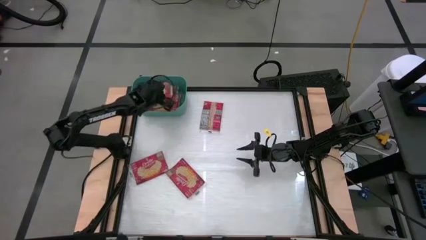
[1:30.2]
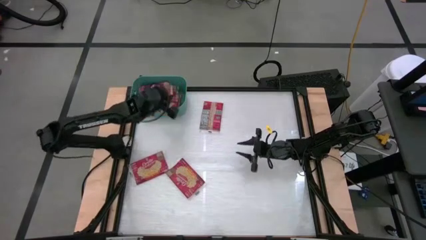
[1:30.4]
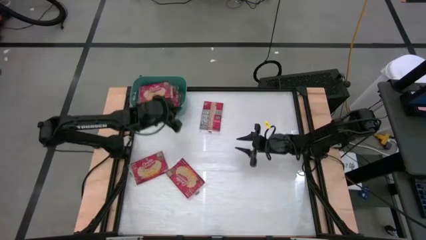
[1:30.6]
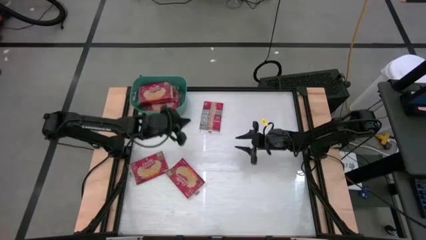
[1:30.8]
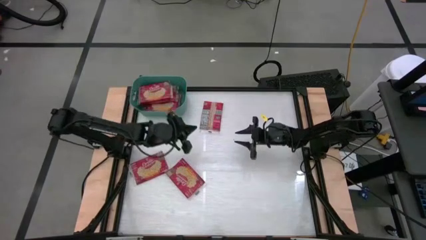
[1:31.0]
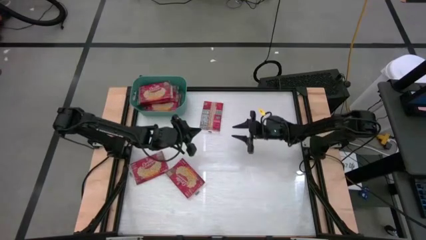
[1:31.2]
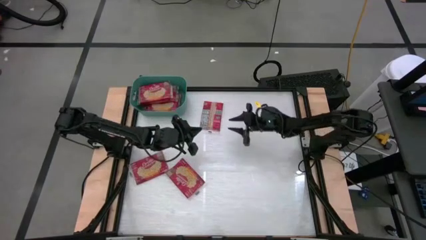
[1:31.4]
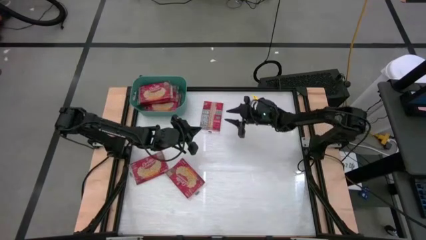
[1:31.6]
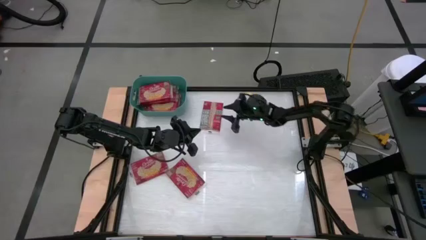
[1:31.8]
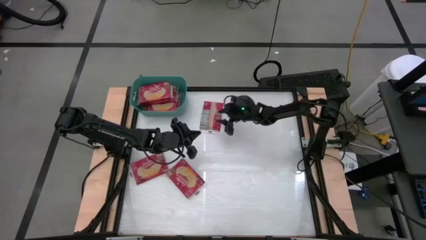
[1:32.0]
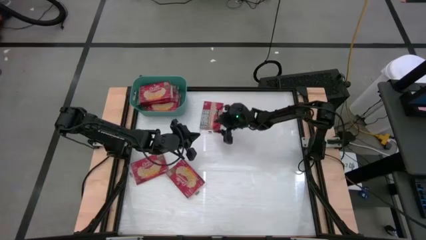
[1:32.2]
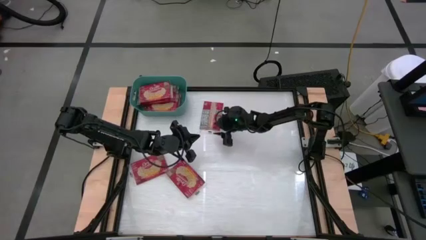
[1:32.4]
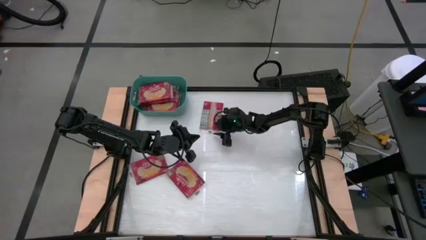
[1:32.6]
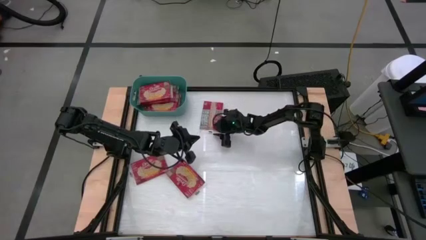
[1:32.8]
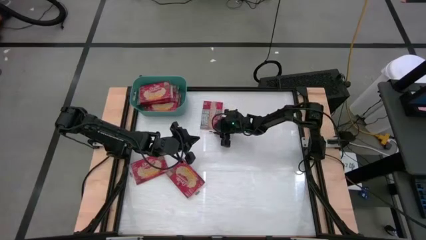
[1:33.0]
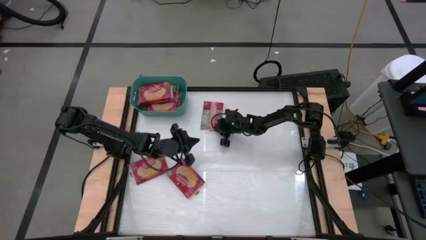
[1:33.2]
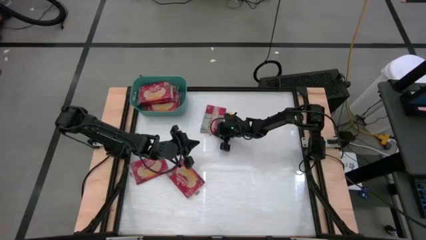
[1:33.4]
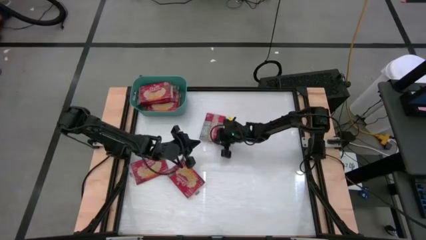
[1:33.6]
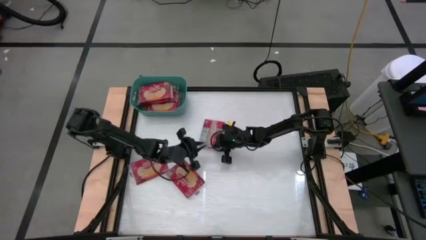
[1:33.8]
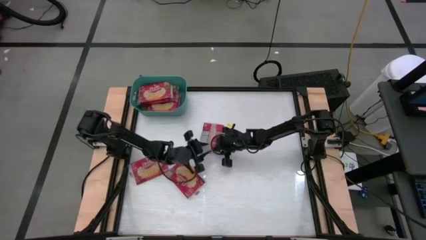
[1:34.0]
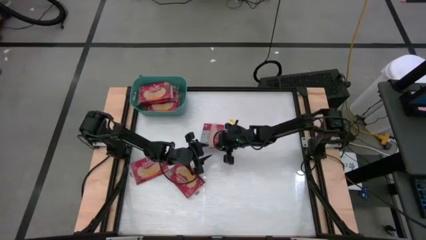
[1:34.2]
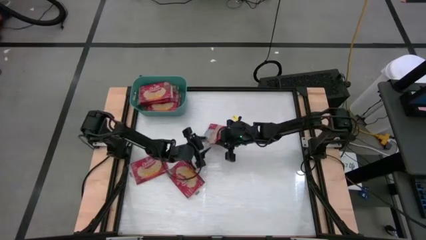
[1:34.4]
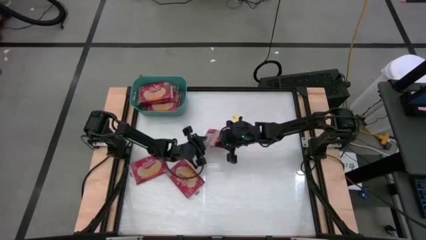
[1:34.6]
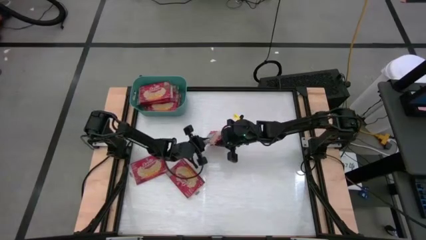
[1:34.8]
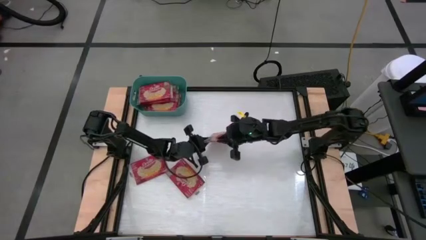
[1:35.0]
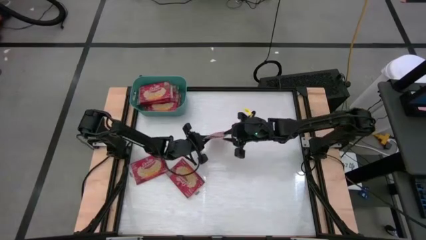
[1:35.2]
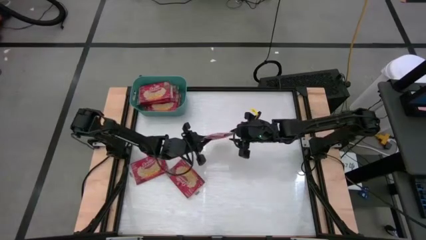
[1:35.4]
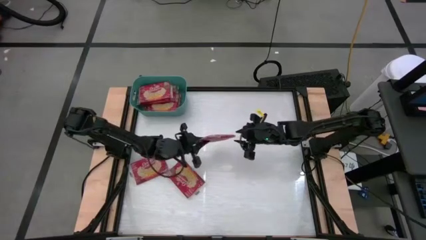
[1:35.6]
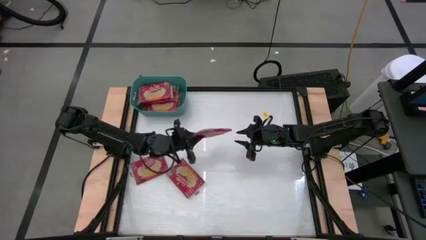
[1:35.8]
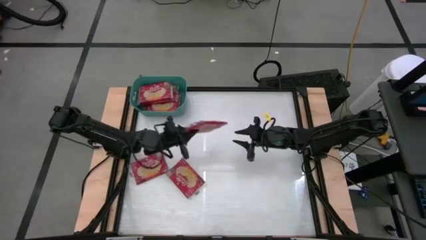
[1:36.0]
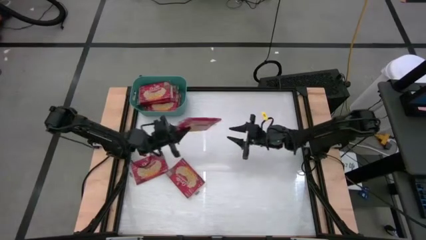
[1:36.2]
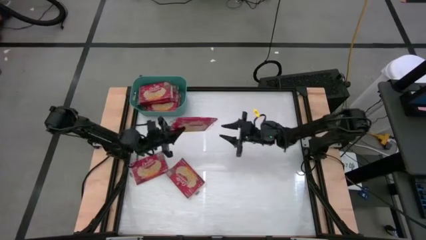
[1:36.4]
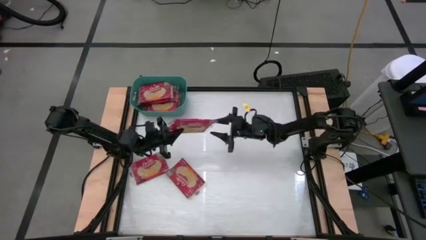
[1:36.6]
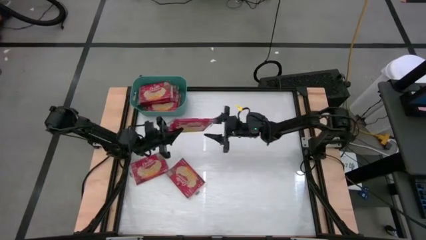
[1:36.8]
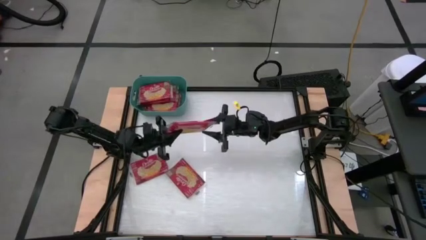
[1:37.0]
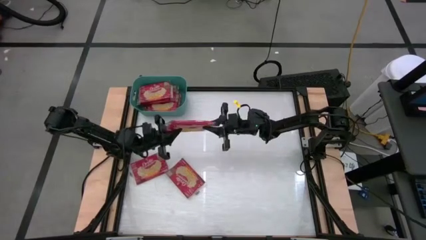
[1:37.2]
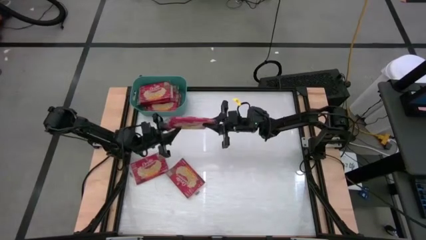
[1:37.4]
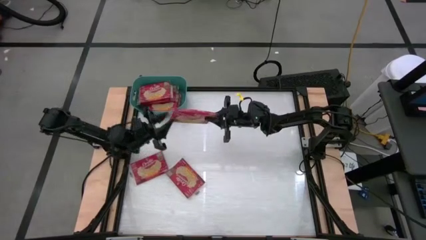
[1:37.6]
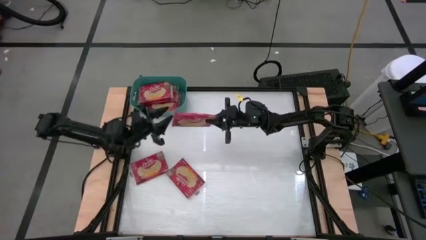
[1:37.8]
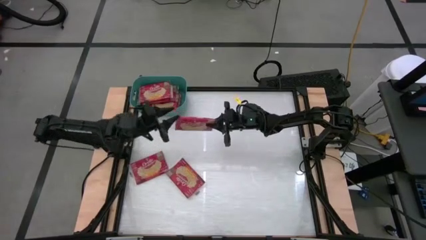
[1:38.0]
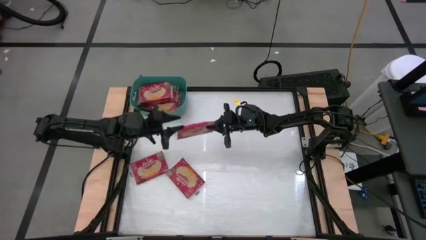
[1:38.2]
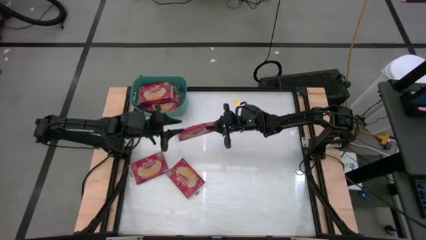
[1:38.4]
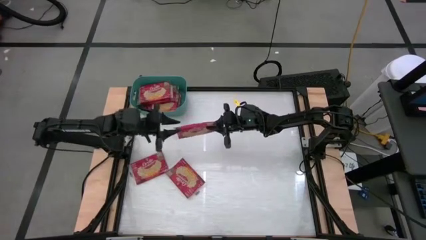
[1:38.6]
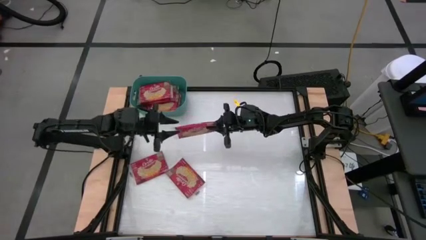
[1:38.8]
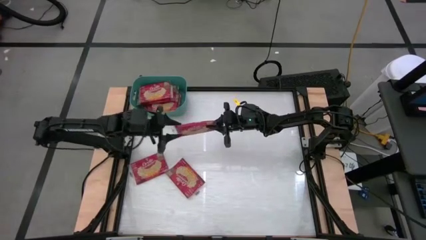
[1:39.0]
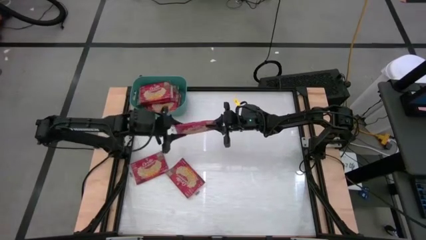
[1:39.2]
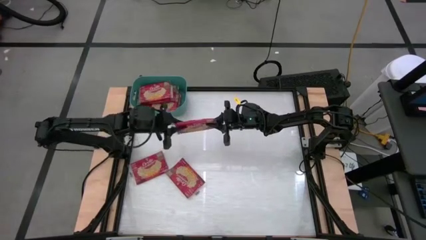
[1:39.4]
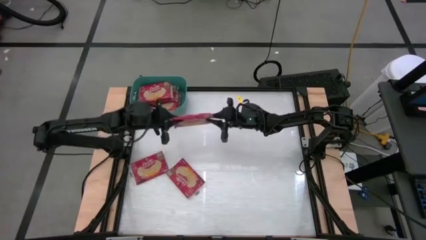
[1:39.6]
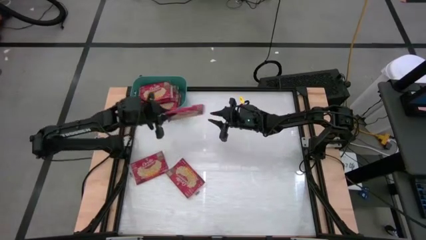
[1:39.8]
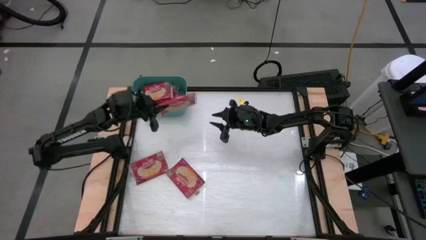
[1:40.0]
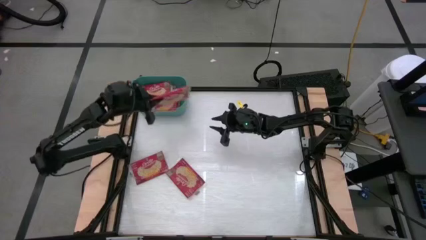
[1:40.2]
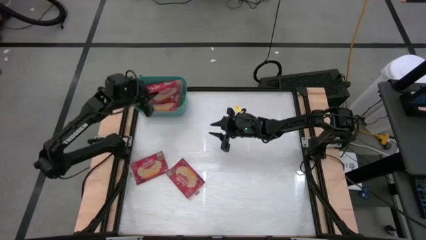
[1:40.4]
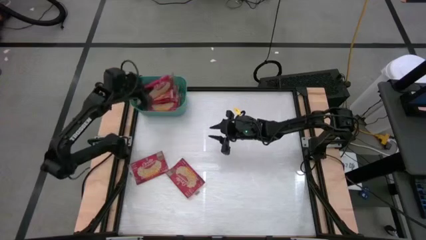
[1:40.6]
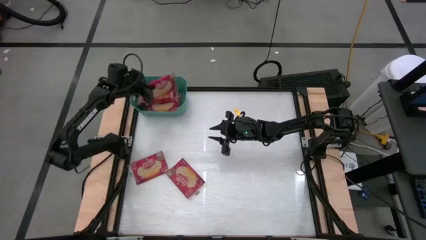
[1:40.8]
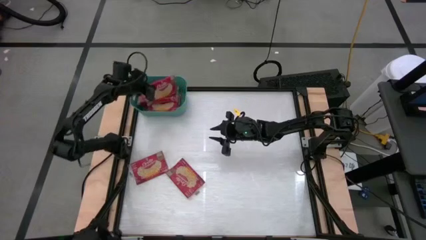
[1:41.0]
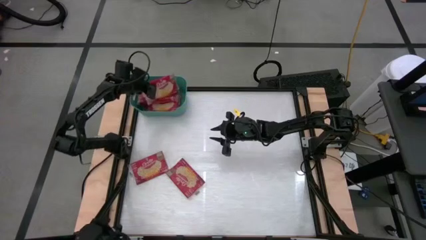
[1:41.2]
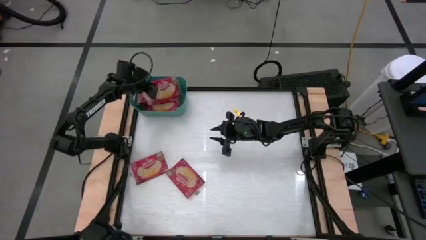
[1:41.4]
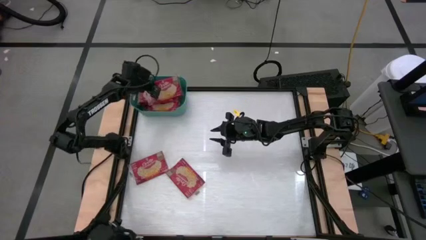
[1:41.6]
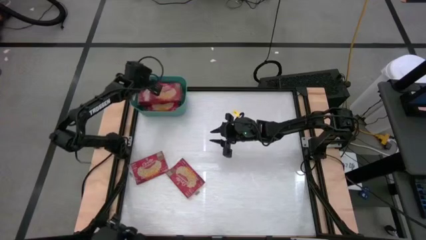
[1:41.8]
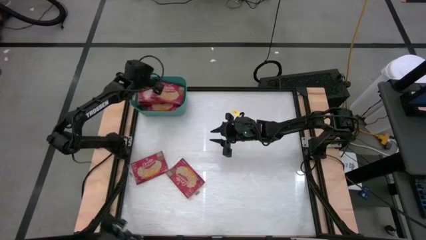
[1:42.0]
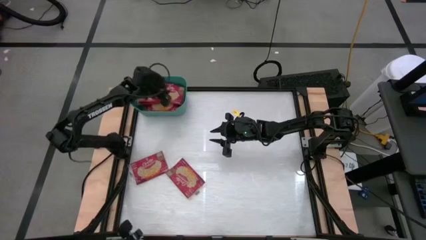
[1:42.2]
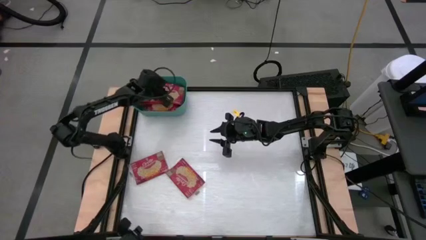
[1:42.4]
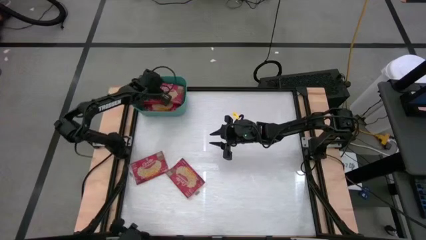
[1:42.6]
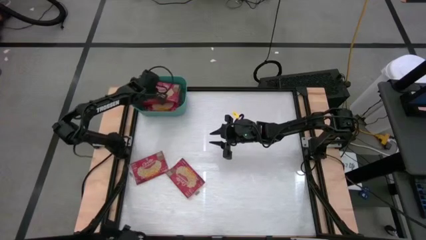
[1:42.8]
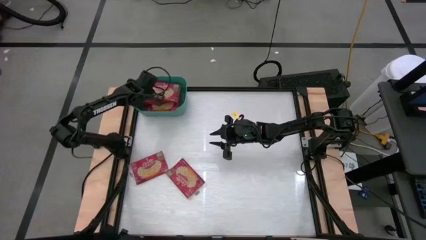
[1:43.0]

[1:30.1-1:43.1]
Task: Sort popcorn bags into baskets
Stack the red popcorn bag on the red popcorn bags in the green bin

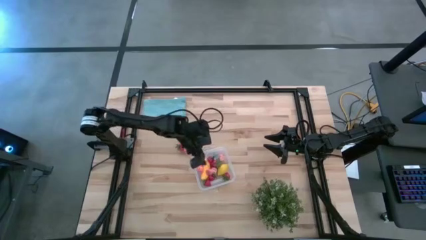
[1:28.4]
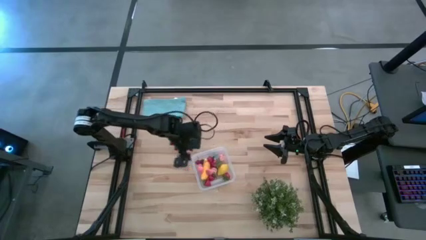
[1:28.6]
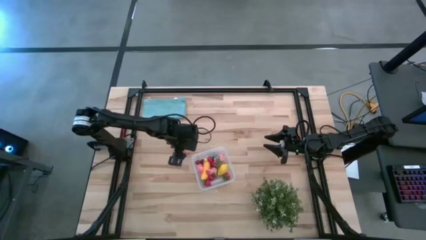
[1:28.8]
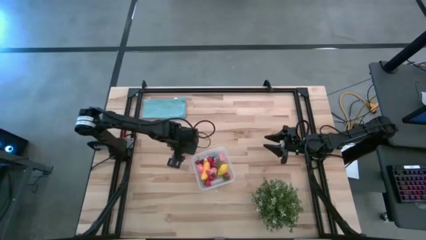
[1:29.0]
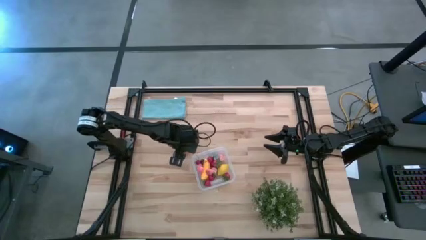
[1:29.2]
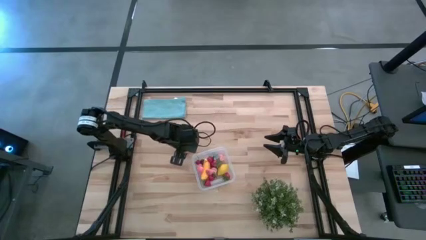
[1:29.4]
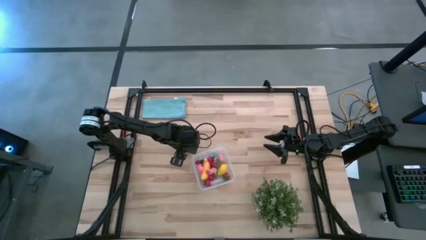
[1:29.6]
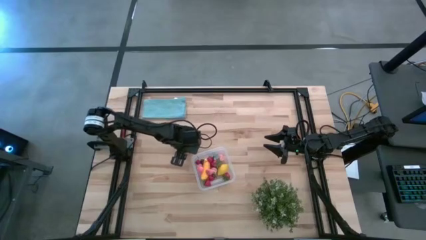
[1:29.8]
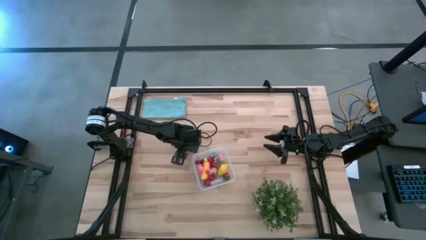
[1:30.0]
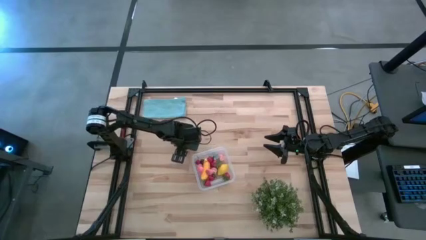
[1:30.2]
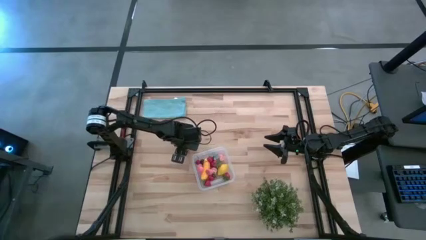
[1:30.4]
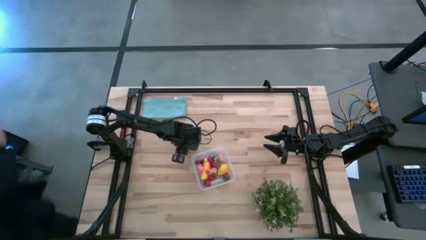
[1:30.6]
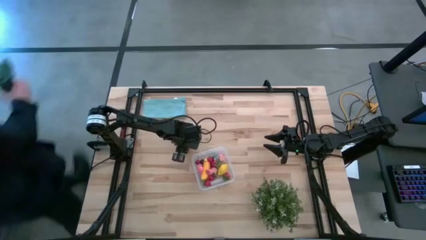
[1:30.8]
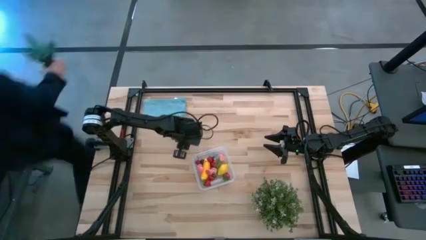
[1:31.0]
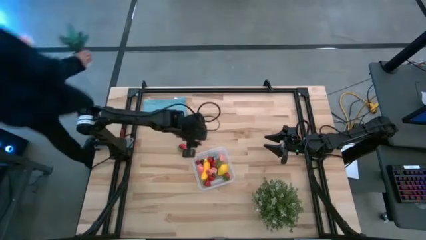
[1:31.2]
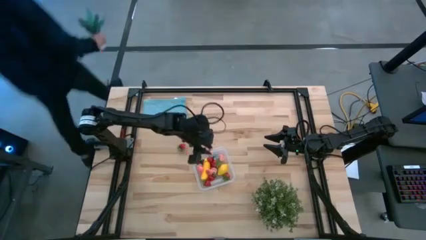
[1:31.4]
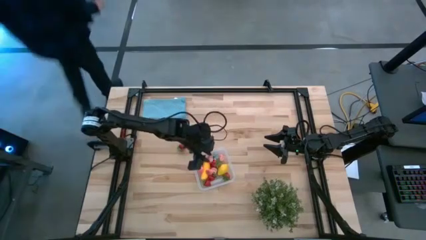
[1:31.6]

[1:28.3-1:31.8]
Task: Pick and placing Produce into tupperware
Put the pink peach into the transparent bin
